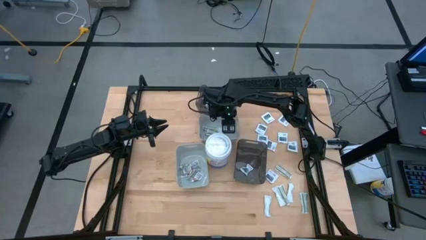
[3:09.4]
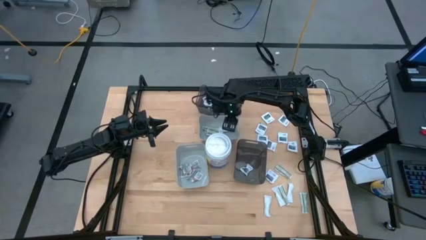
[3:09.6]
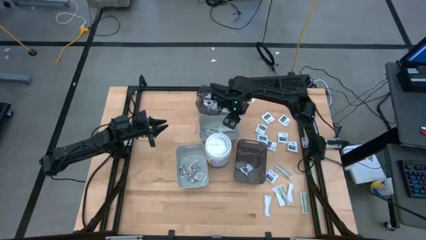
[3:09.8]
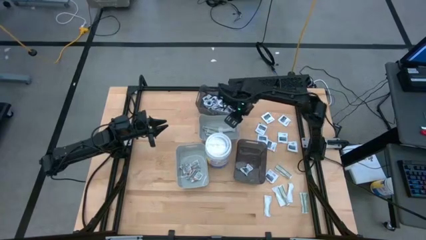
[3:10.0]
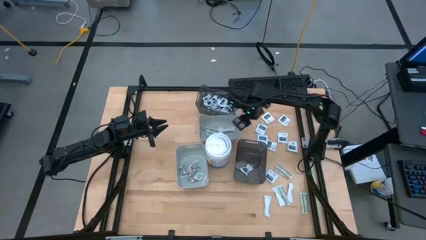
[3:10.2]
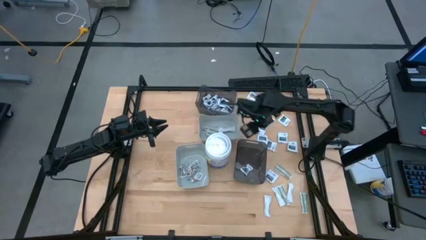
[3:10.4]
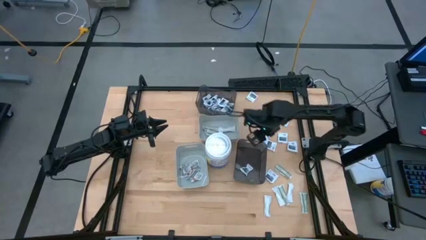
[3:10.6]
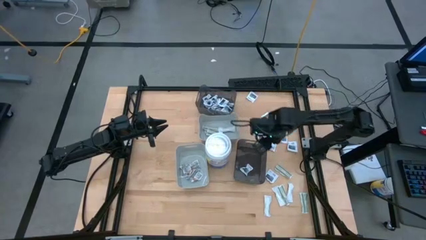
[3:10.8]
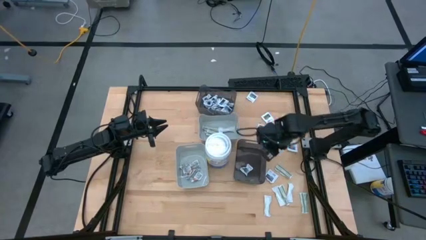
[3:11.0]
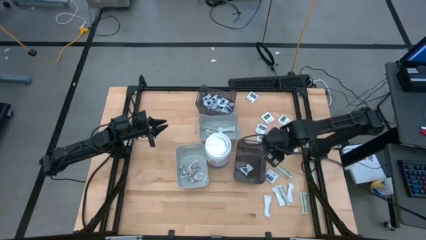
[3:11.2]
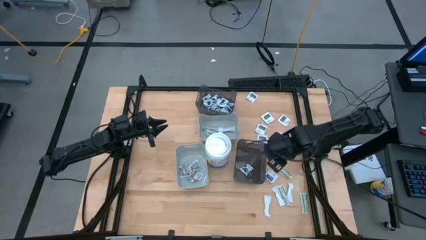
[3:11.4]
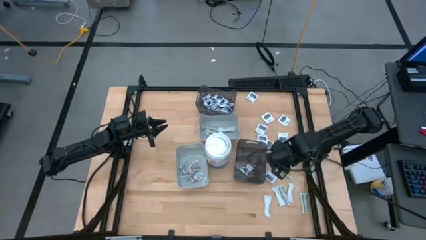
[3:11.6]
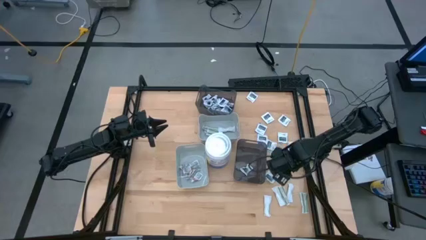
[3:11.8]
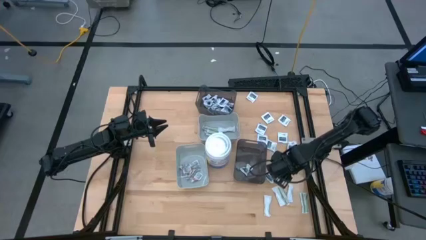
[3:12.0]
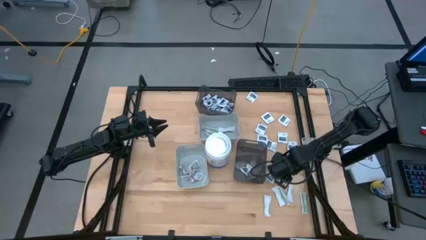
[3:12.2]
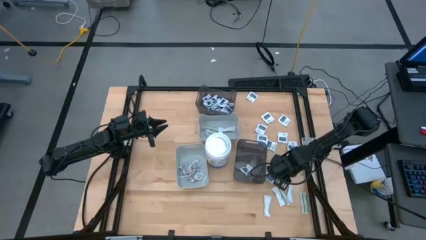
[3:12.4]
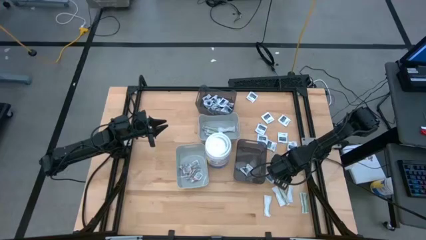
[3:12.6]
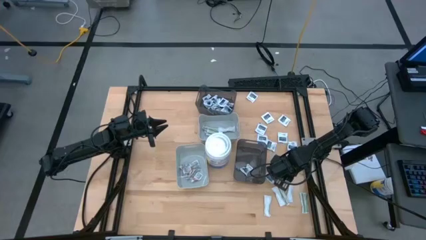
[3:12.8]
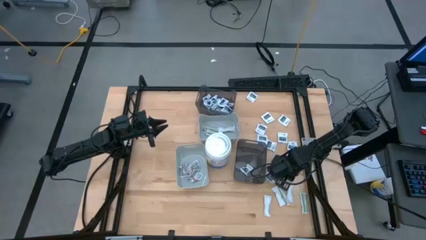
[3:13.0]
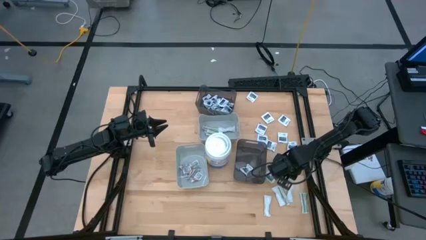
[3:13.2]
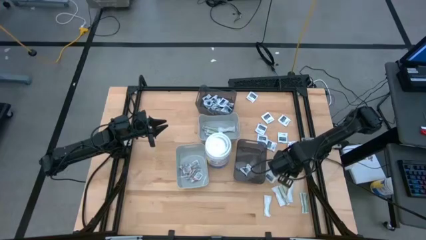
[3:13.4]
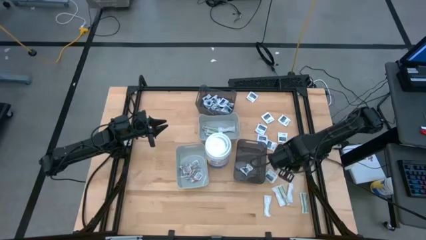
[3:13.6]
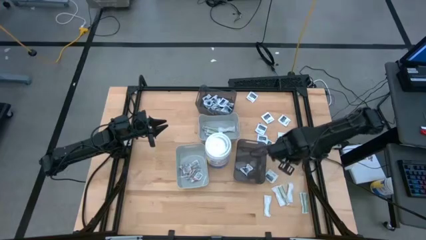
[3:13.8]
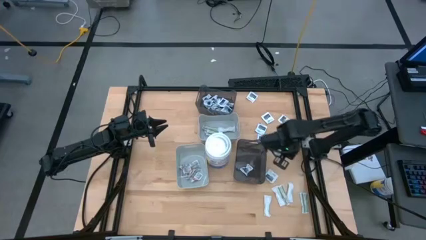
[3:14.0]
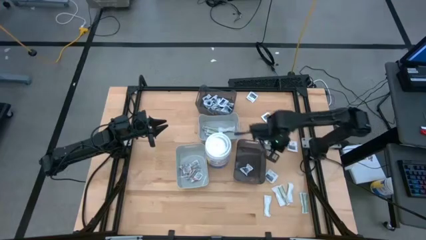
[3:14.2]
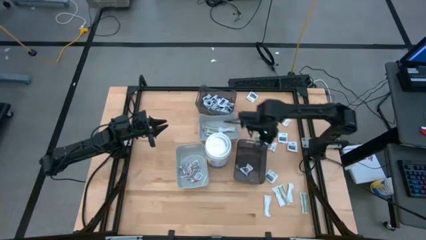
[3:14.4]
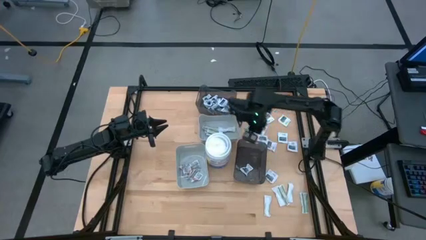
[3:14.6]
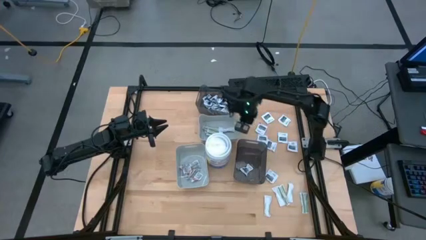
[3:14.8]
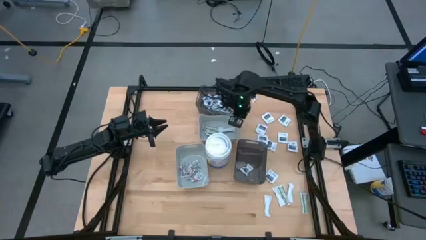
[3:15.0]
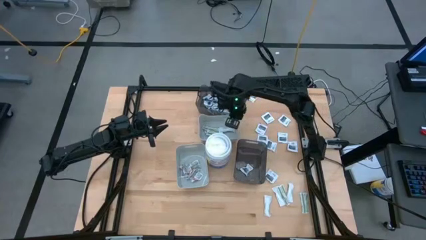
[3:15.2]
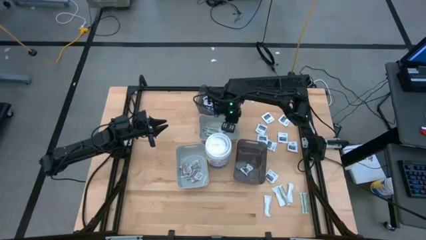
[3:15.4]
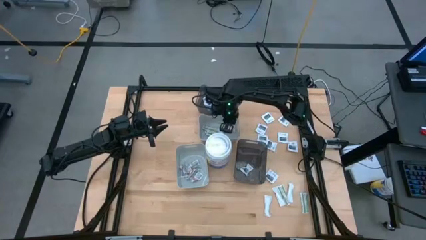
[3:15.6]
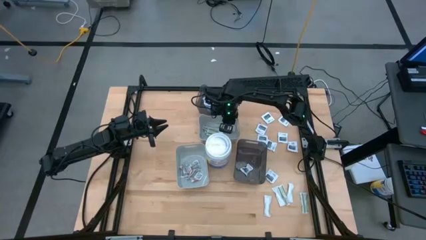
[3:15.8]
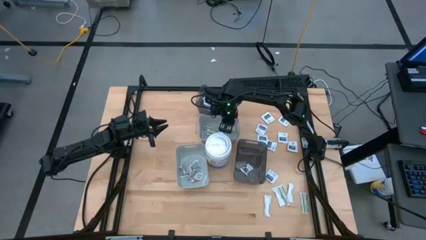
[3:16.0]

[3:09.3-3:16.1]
Task: Pick & Place First Aid Supplies
Put the bandage into the top gray bin

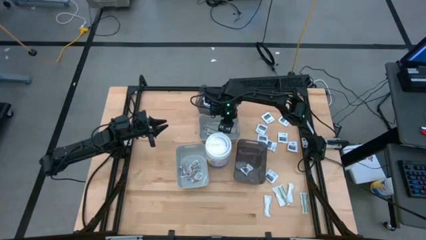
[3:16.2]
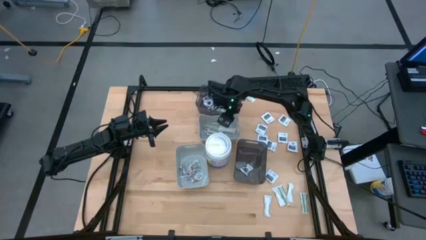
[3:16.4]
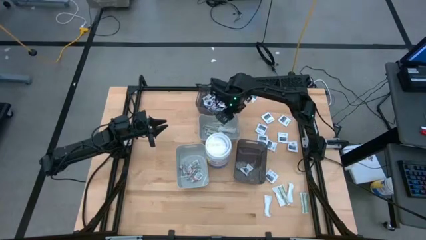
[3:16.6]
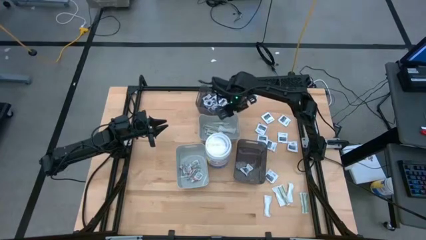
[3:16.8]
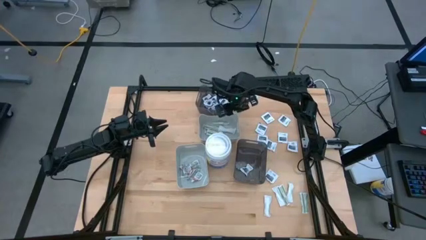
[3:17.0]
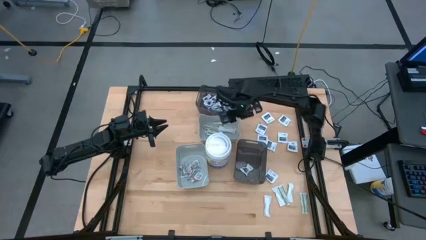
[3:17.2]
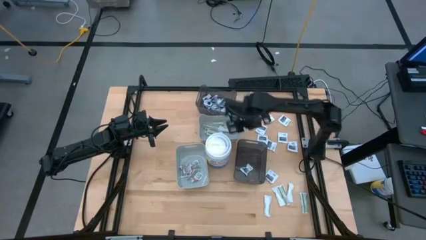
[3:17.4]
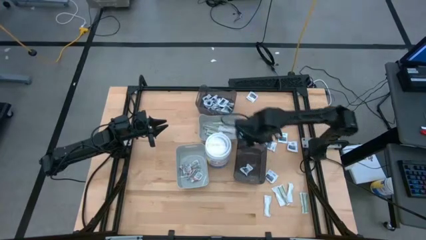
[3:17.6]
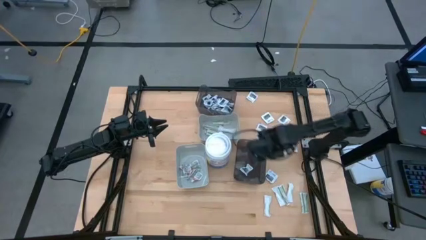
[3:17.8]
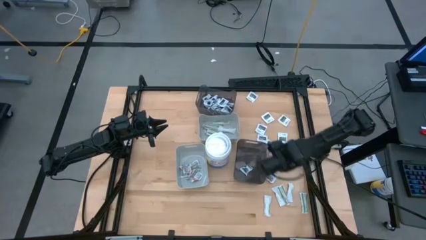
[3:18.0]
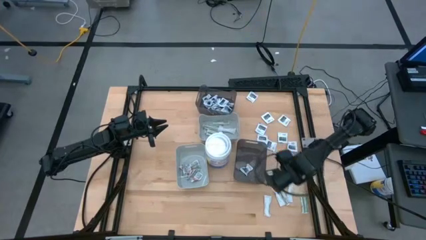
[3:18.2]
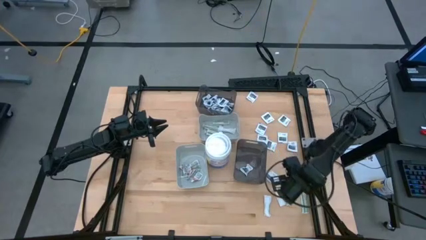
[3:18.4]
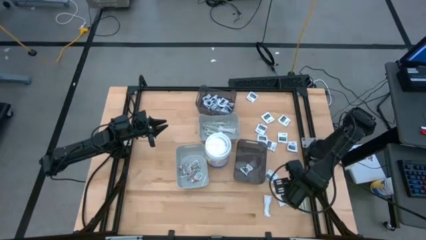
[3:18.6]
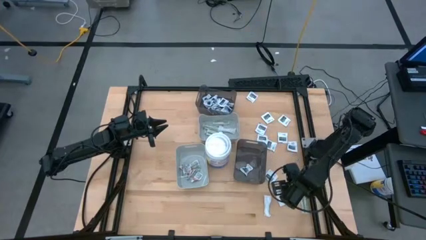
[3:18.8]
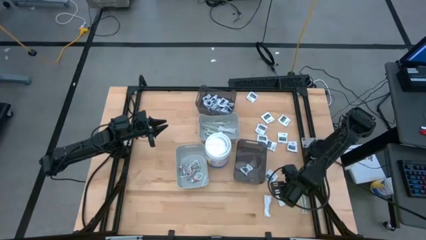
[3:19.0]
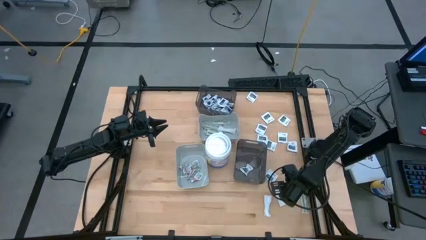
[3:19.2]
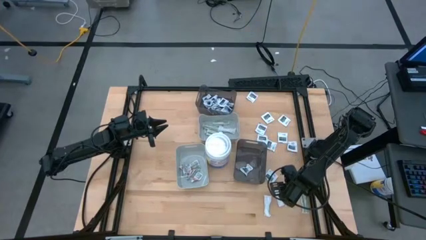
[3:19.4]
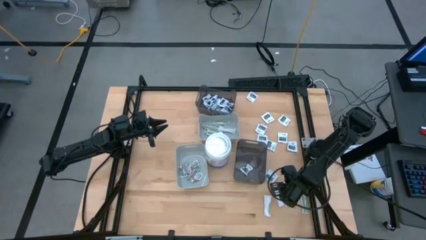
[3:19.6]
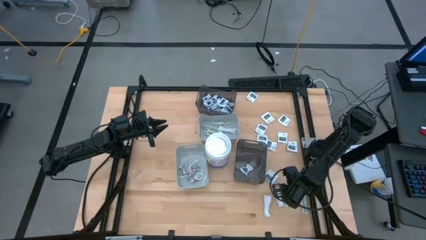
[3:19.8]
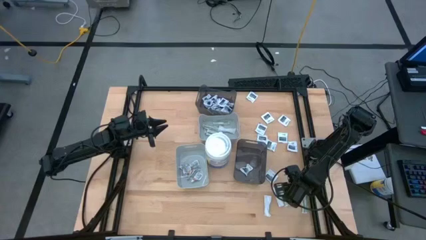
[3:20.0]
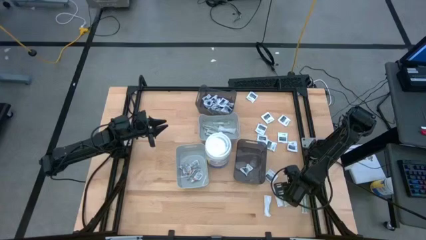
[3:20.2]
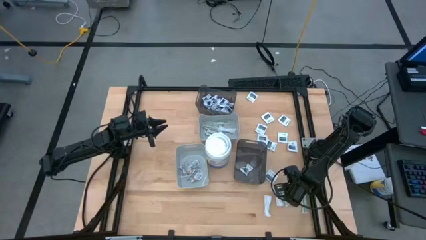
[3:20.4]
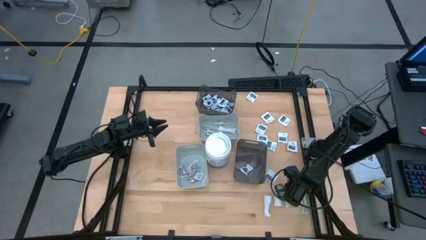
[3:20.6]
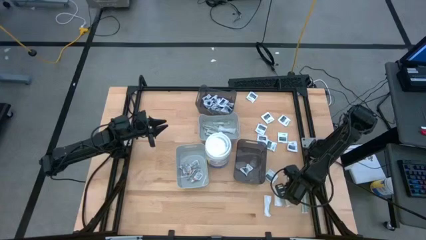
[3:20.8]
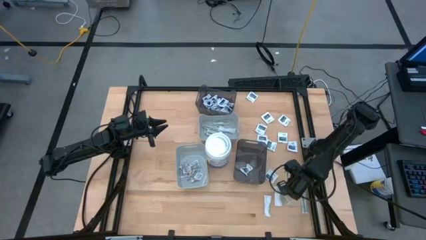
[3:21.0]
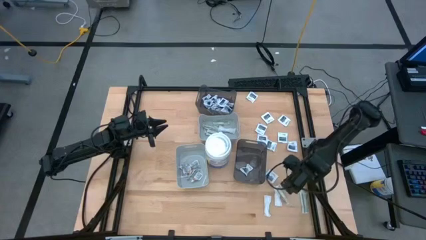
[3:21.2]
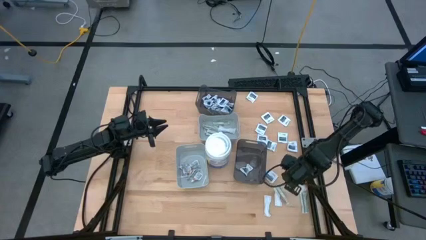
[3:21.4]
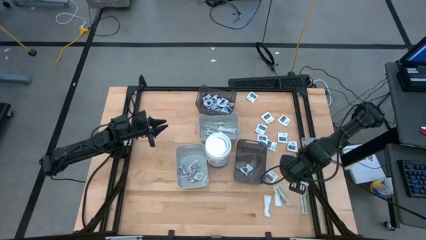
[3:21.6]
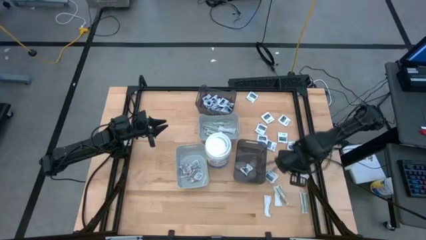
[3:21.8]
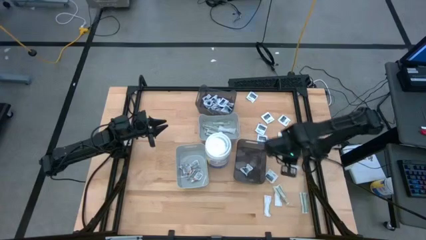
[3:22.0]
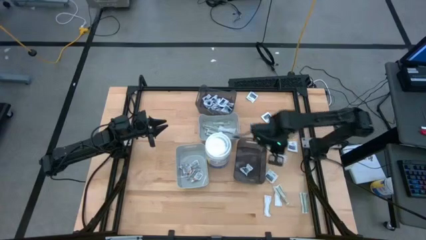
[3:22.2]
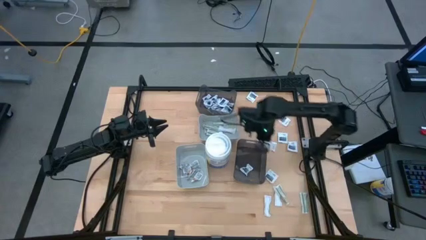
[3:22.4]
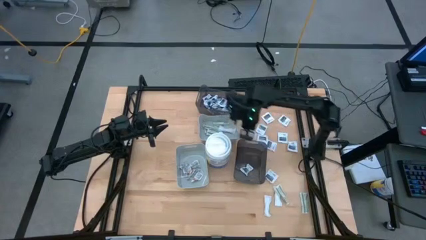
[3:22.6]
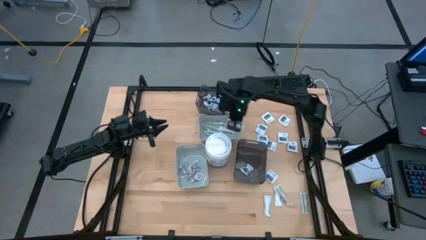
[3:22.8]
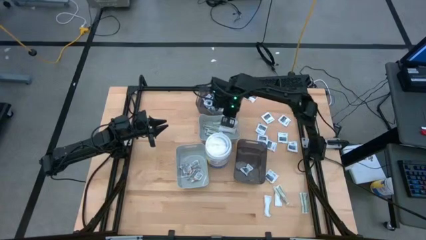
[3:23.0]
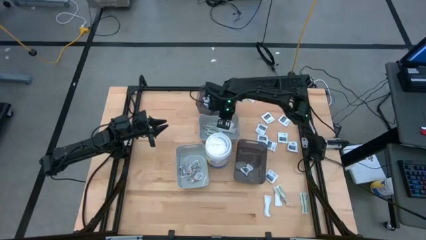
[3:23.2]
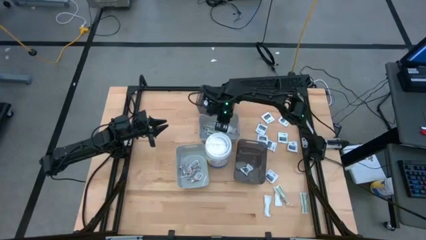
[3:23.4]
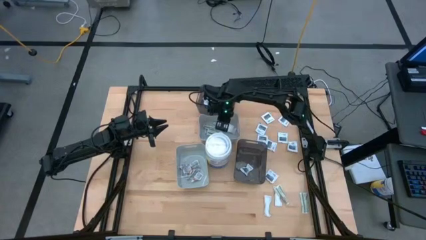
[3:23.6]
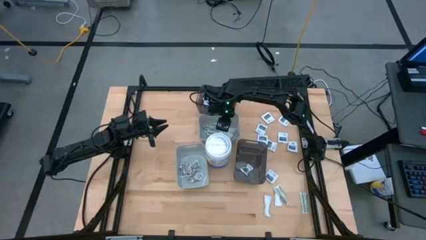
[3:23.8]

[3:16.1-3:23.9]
Put the bandage into the top gray bin

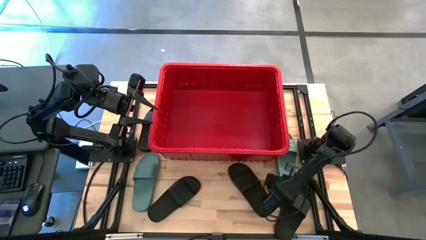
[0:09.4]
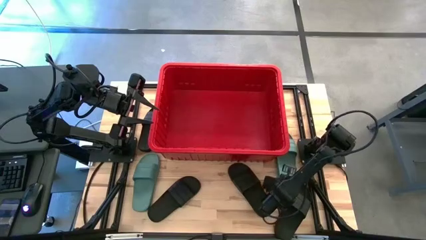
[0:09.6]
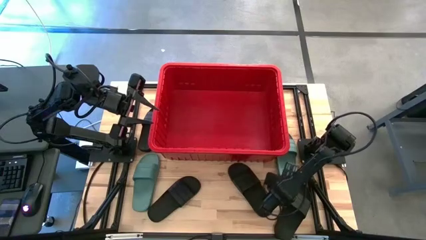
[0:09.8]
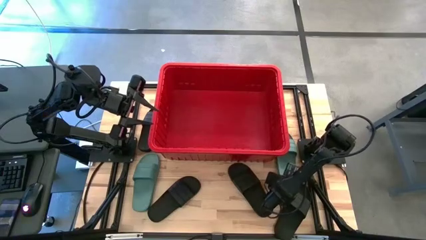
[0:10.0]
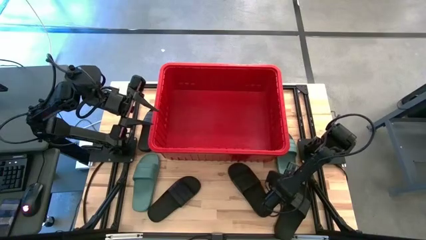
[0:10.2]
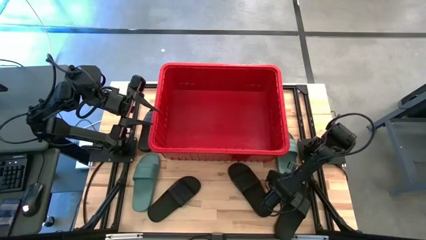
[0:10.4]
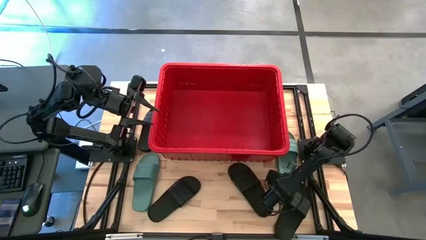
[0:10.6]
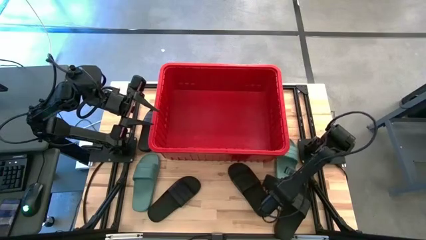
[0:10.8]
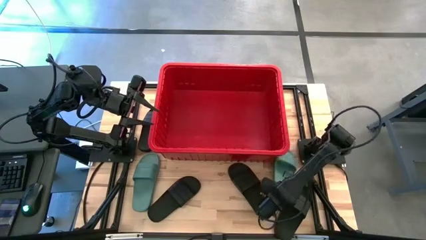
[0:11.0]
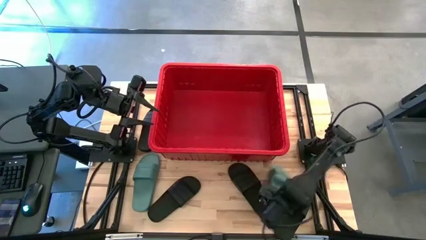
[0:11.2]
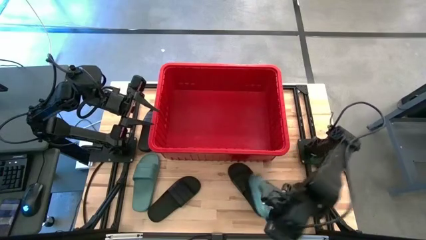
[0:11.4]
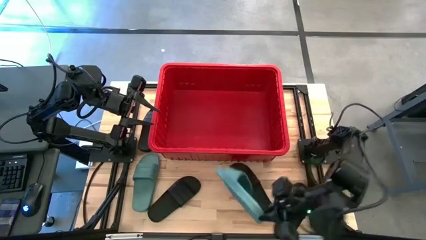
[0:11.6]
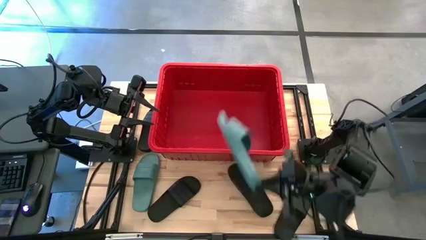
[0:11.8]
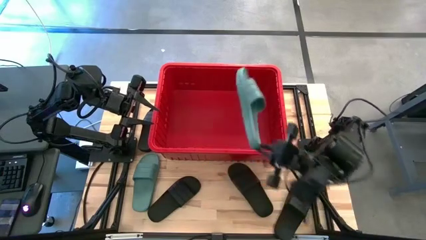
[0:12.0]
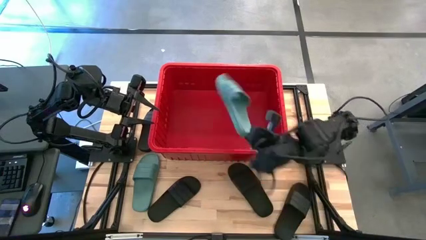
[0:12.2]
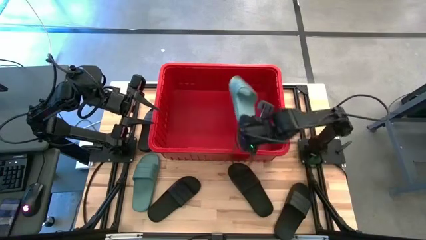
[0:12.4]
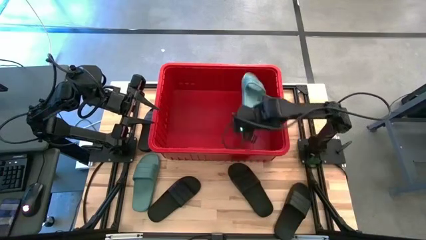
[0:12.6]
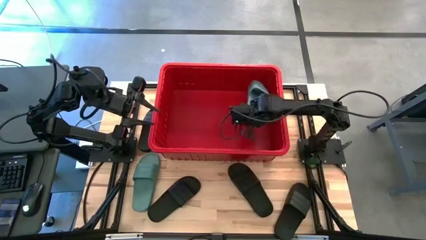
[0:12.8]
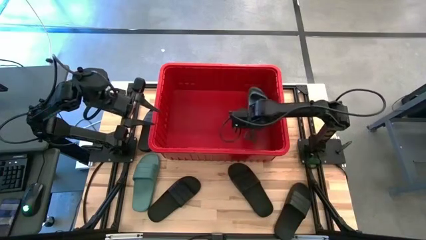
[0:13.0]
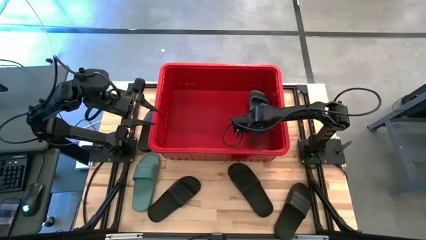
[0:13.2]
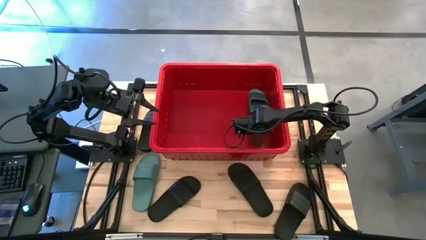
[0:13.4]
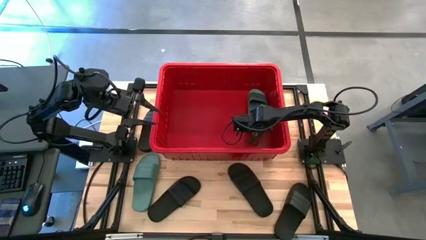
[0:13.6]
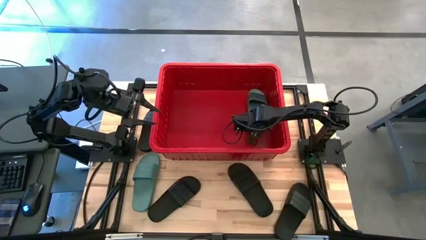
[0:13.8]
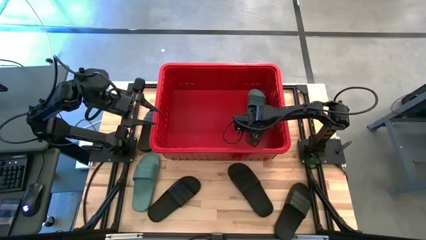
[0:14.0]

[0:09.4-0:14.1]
Task: Pick and place slides into bin
Put the green slide into the red container
